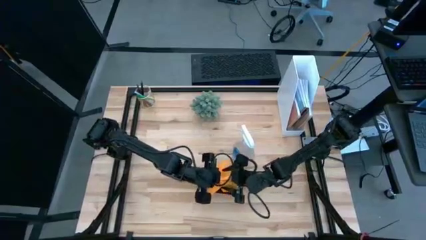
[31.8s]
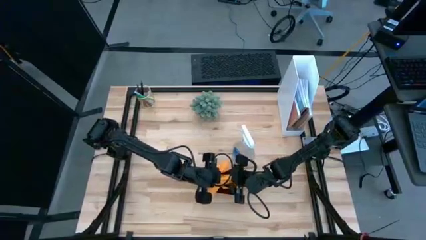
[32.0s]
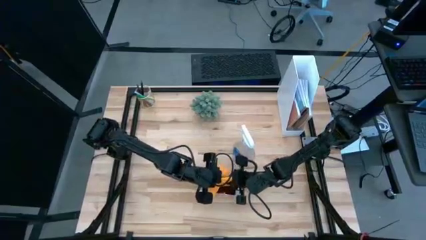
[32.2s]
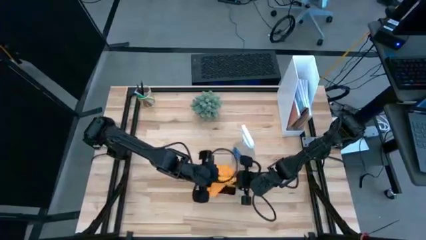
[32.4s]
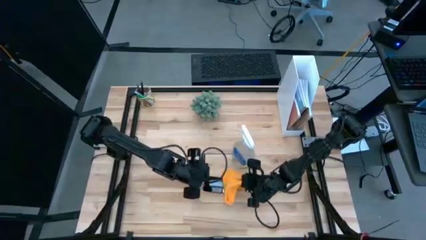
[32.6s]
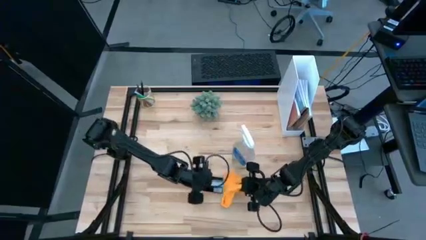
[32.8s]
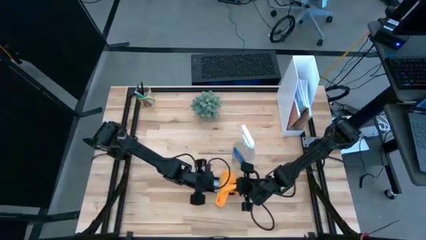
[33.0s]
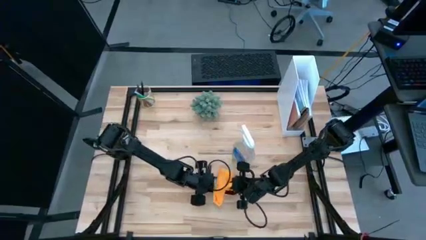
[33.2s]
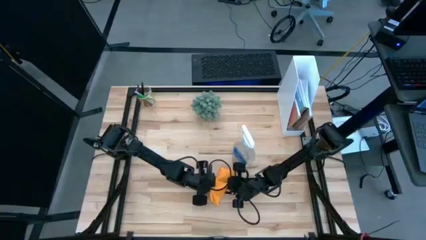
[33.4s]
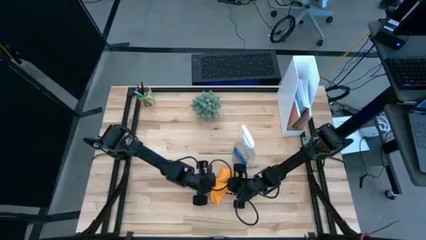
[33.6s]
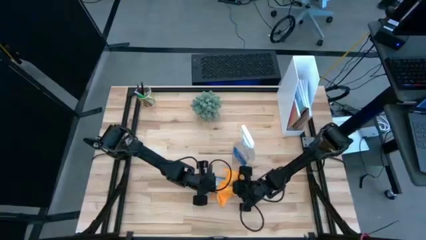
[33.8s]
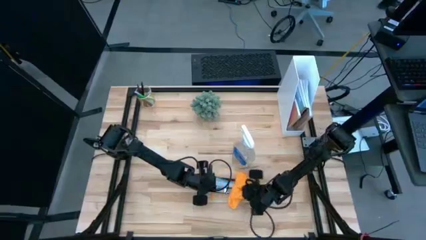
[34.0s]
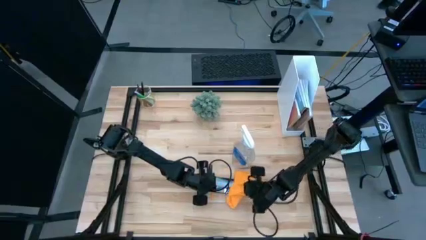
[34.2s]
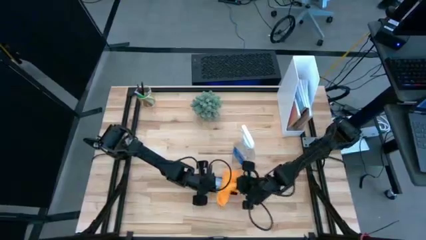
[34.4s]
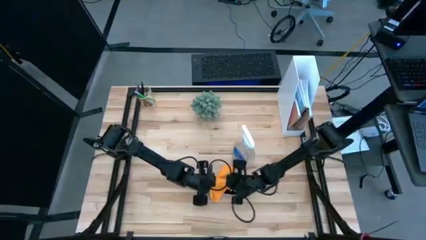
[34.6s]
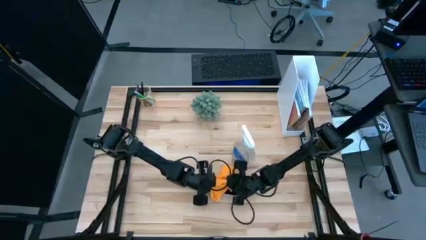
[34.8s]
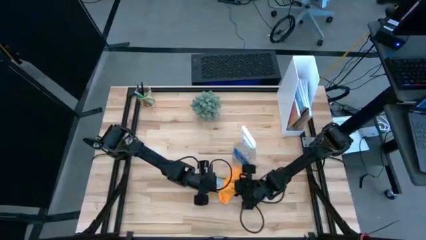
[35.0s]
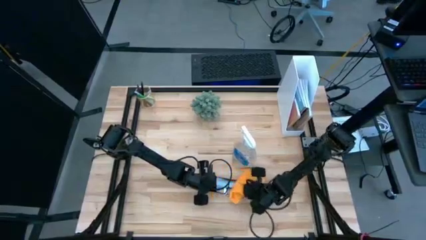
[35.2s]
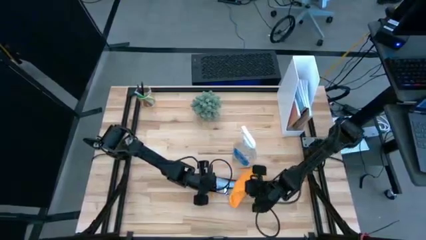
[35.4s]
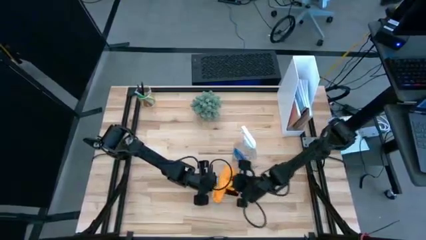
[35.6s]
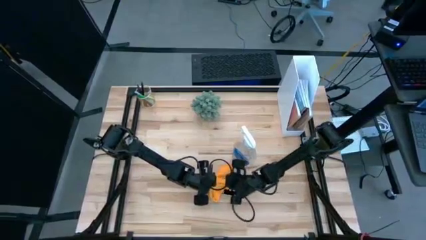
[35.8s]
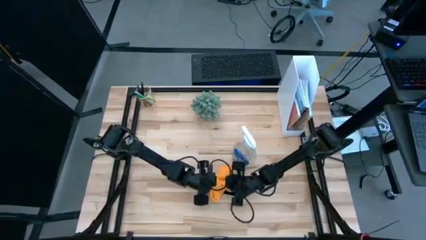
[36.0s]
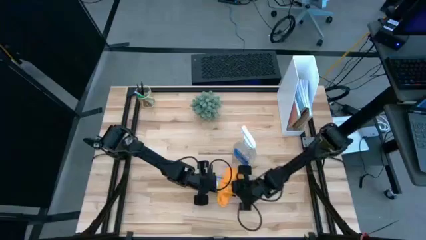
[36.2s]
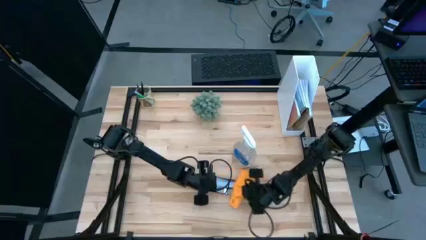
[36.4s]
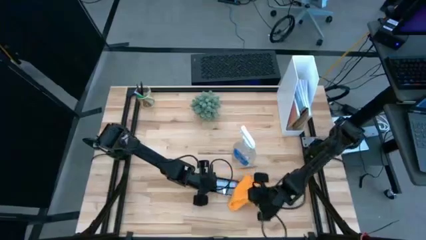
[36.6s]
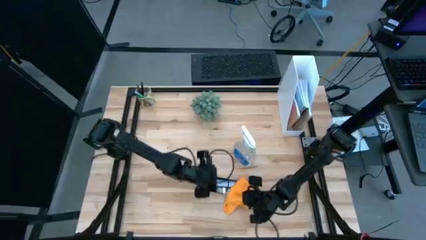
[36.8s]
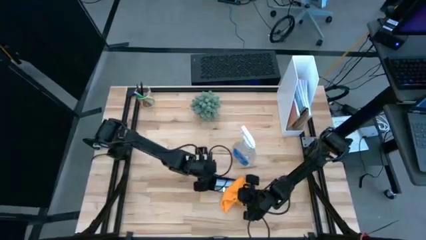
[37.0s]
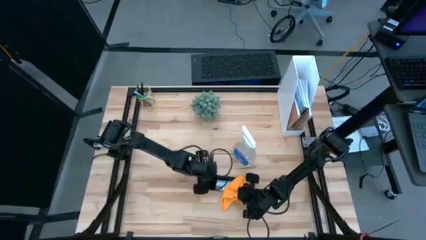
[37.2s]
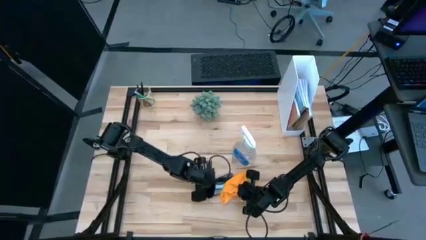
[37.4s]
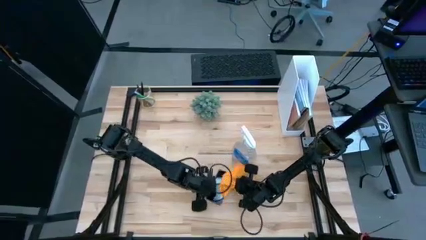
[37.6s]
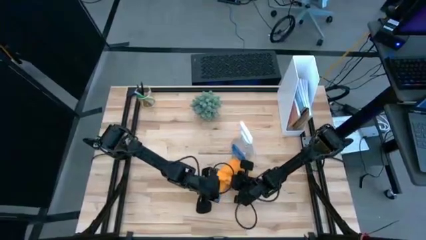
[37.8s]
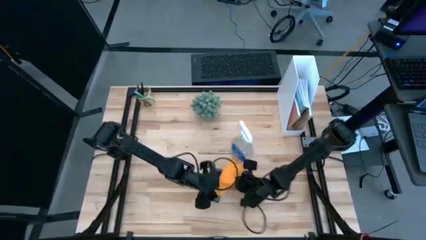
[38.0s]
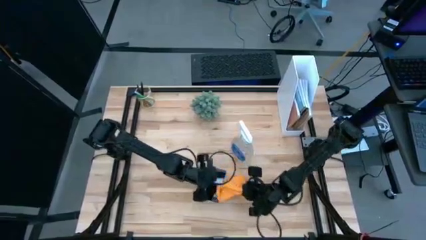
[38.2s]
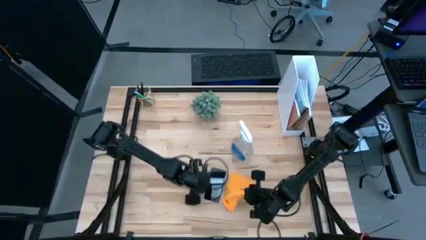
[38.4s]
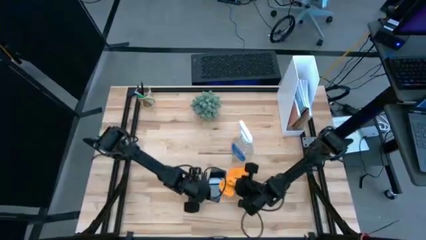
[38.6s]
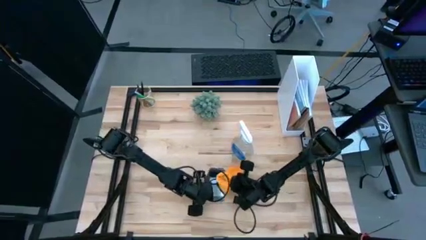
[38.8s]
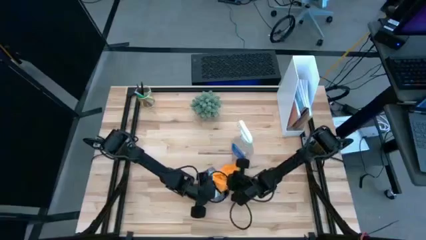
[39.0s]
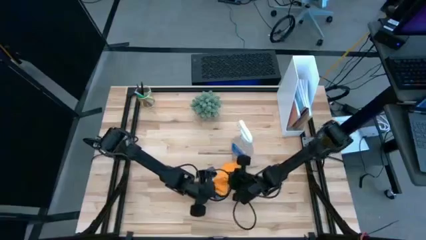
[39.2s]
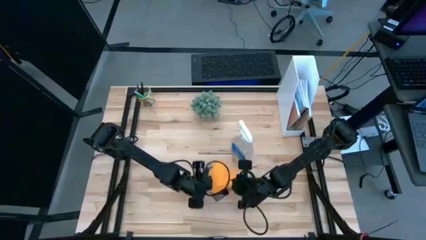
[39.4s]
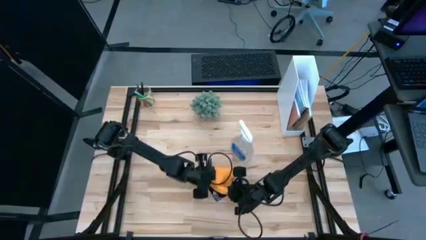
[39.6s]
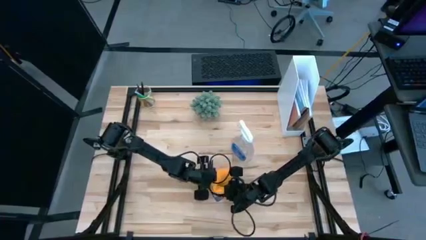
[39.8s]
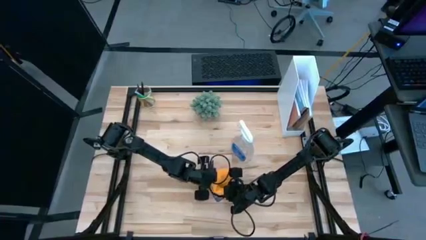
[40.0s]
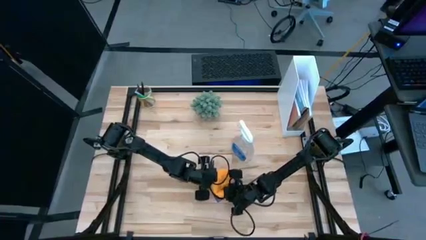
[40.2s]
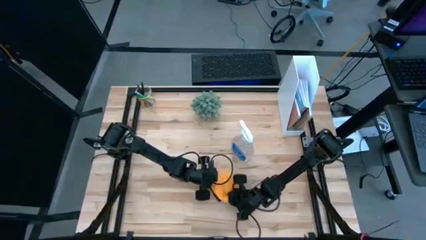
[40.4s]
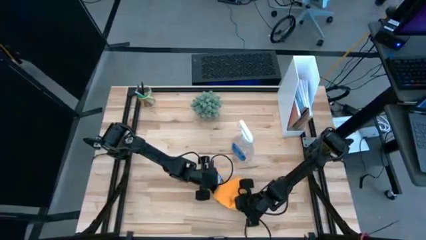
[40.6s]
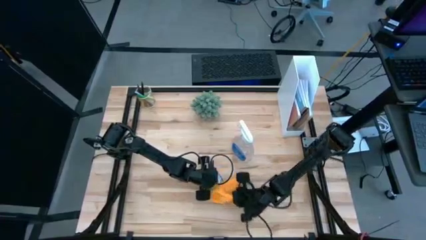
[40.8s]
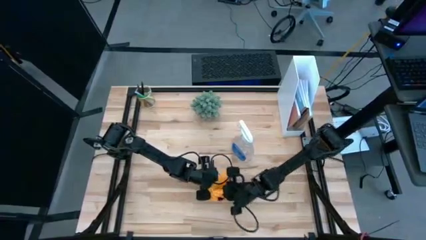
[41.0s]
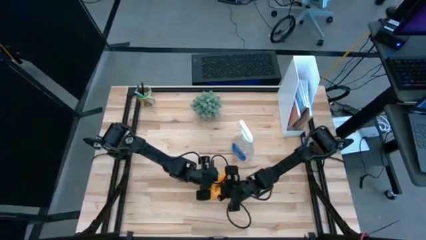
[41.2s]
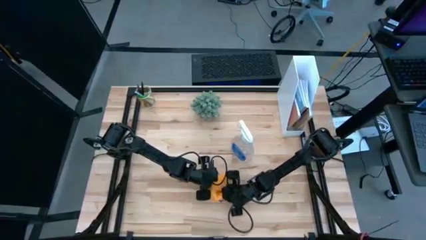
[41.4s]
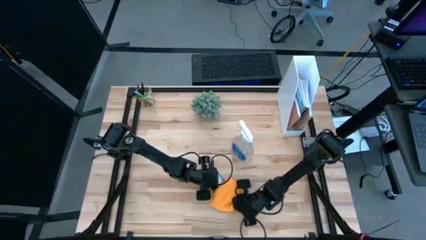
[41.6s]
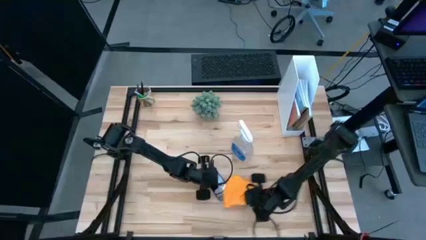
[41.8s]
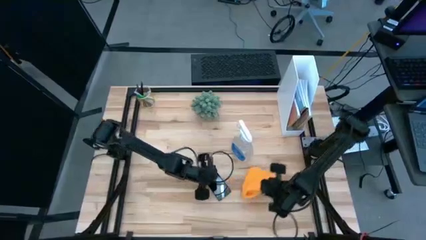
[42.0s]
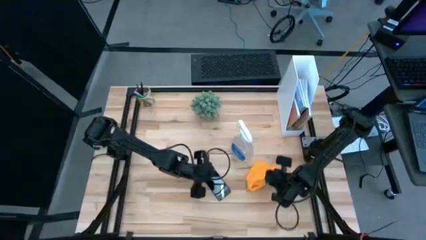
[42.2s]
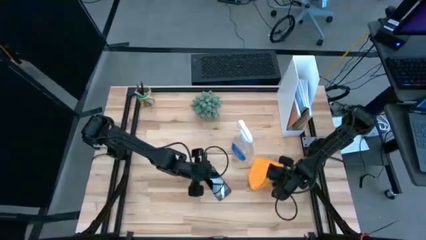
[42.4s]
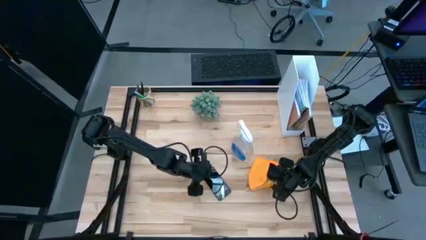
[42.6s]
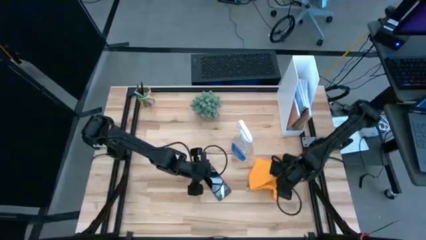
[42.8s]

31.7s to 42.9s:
Task: Apply microfiber cloth
Wipe the pink cellphone with the orange microfiber cloth

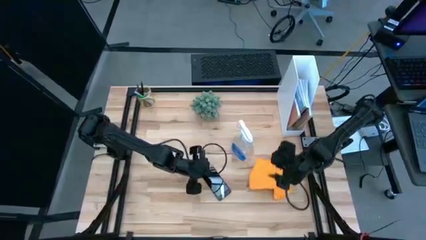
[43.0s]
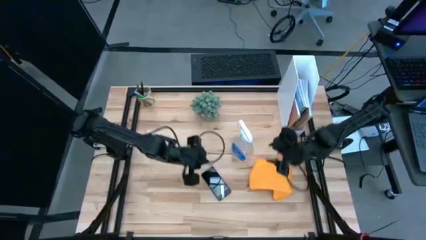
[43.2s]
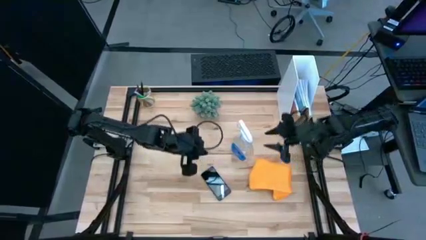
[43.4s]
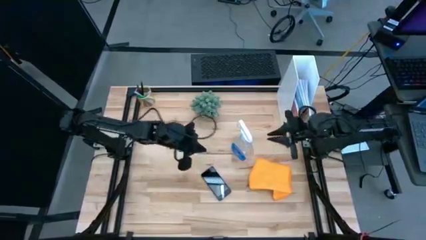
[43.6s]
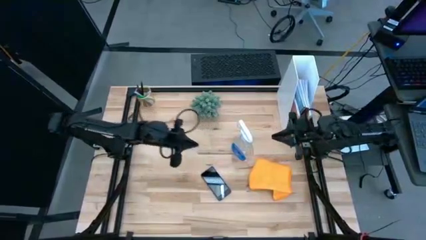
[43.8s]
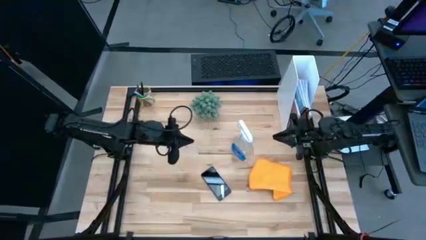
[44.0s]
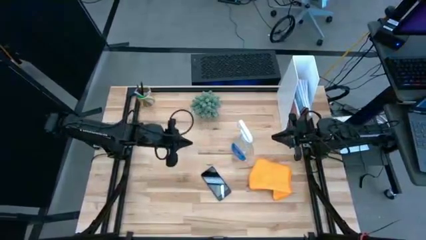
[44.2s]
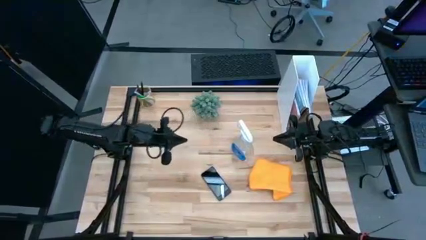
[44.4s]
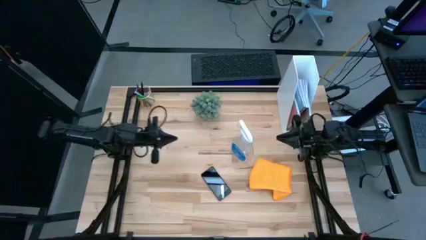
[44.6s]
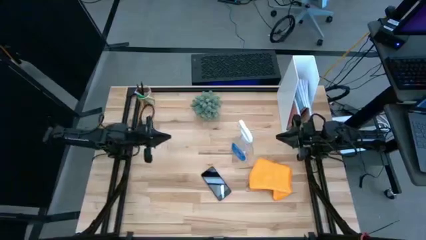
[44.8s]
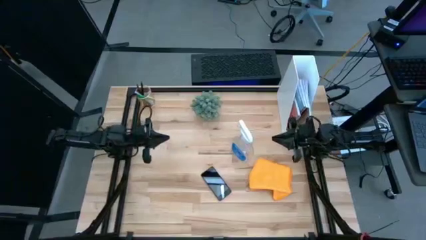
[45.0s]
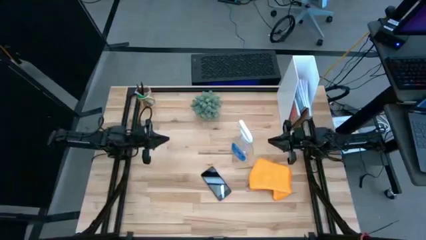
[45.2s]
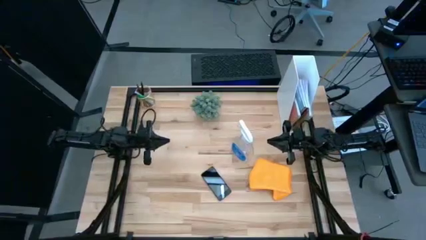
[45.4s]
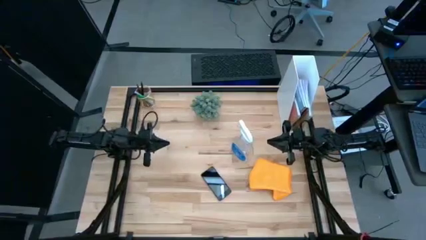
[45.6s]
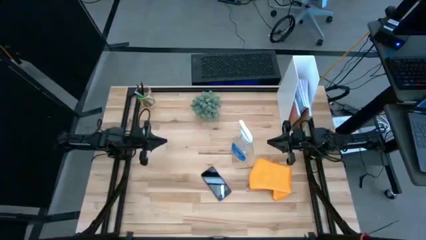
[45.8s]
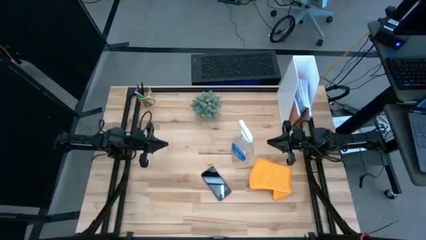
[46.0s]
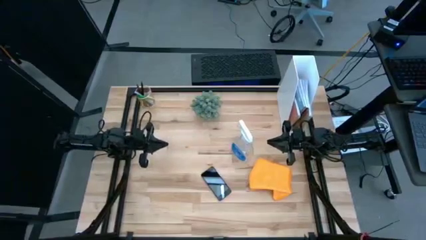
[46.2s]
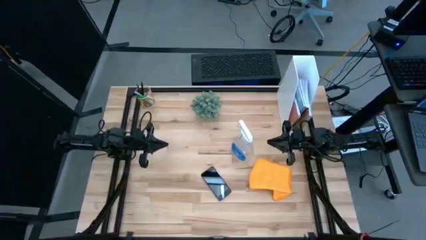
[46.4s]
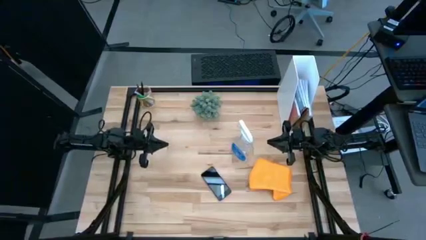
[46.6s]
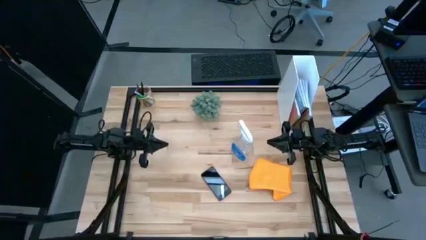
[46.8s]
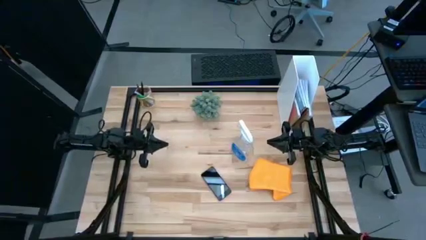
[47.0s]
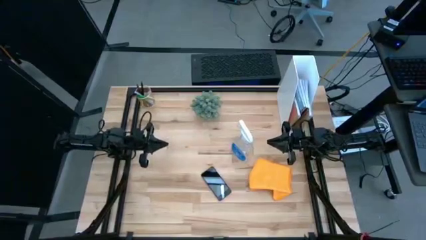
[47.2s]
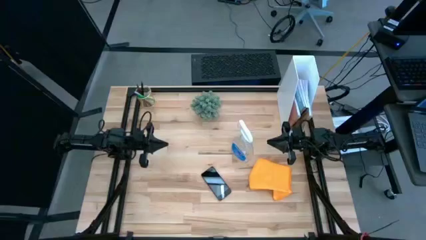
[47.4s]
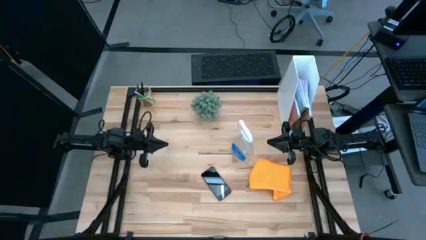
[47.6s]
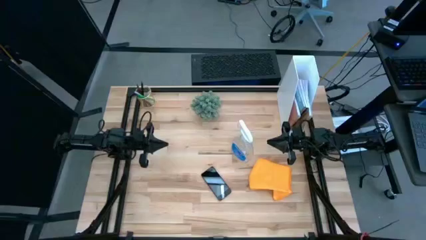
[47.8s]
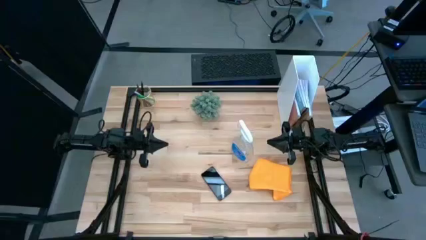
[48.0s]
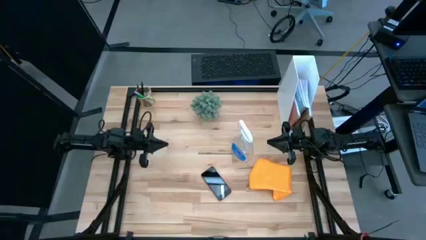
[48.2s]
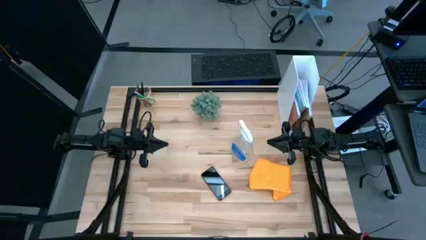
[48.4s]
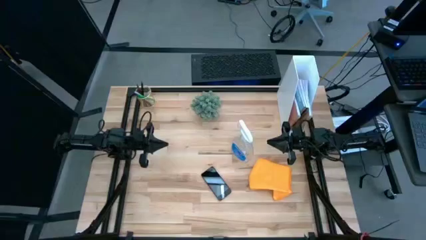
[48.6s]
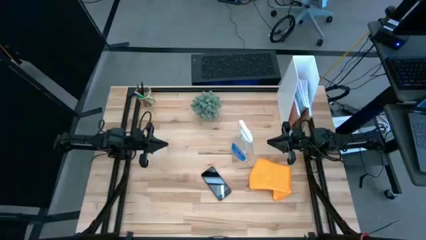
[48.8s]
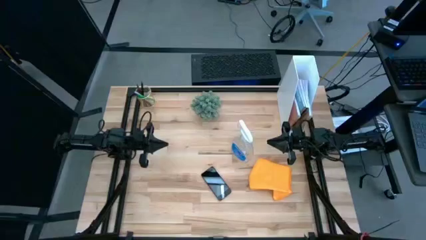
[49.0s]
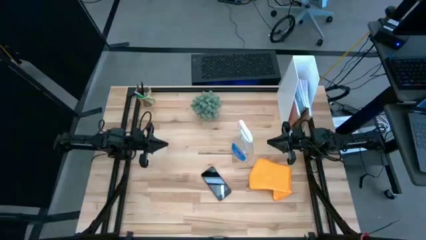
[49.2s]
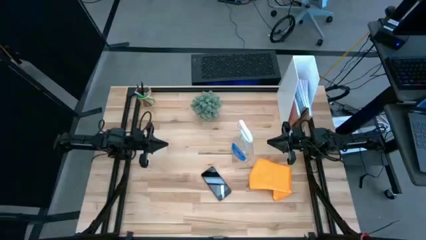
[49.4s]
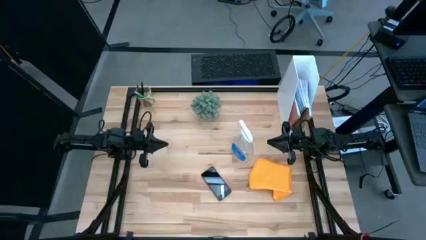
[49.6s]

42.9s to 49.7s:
Return to Home Position
